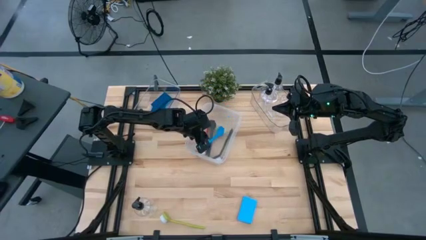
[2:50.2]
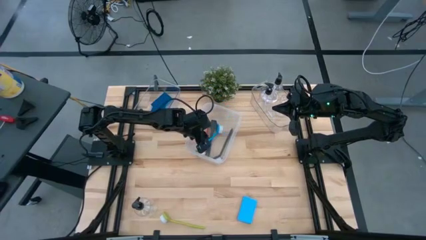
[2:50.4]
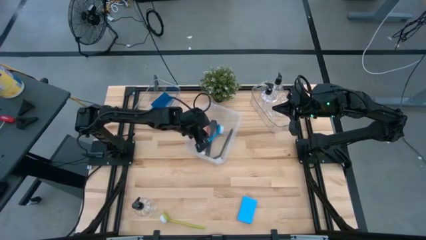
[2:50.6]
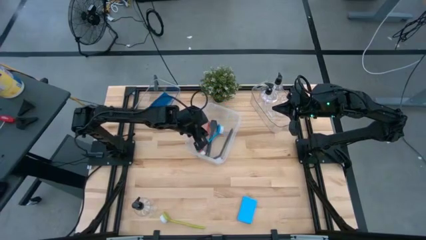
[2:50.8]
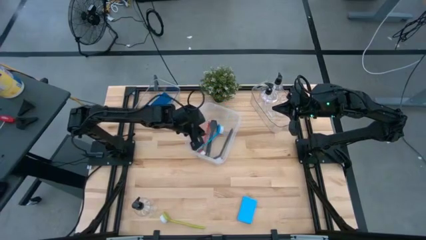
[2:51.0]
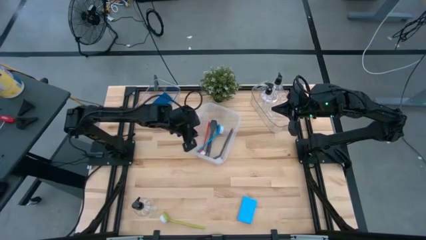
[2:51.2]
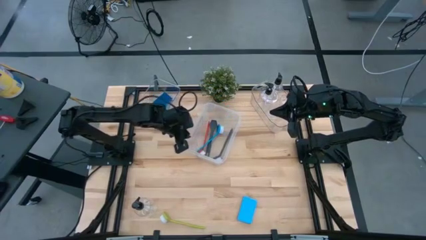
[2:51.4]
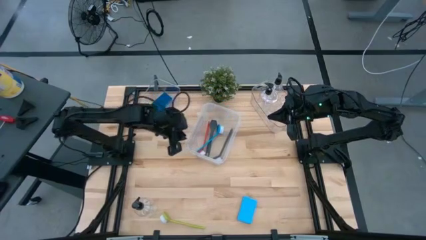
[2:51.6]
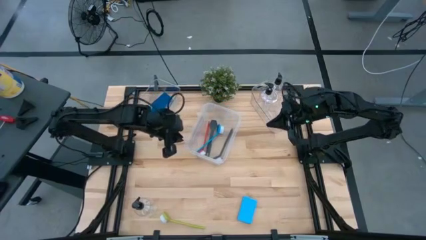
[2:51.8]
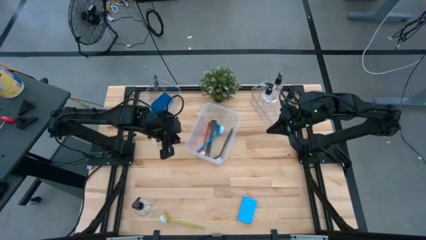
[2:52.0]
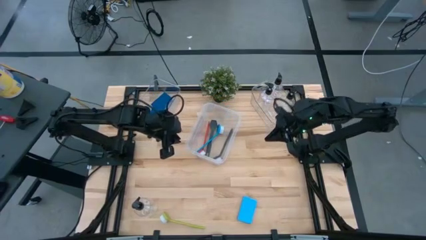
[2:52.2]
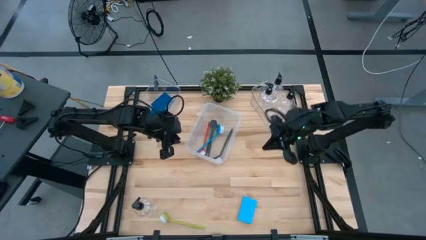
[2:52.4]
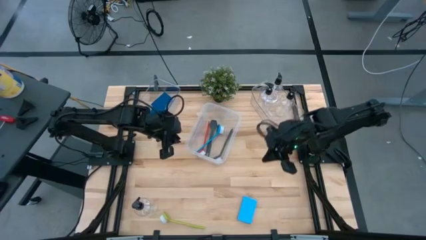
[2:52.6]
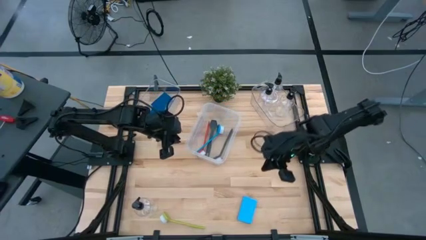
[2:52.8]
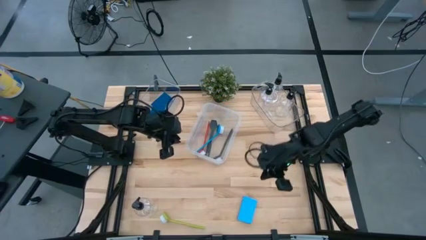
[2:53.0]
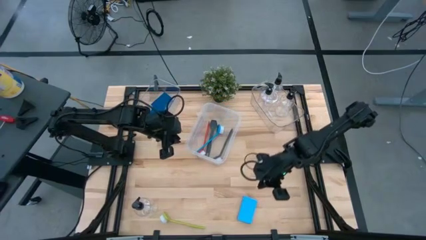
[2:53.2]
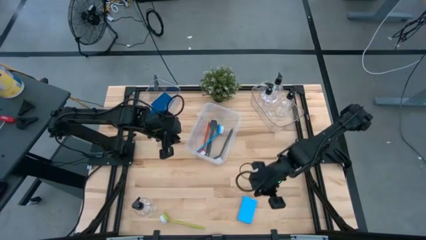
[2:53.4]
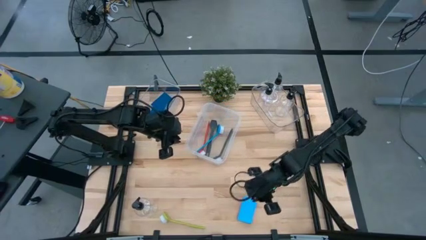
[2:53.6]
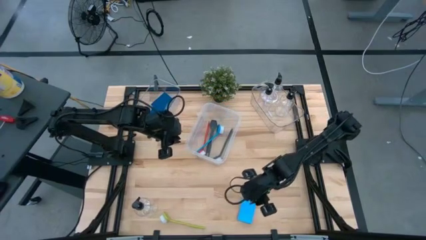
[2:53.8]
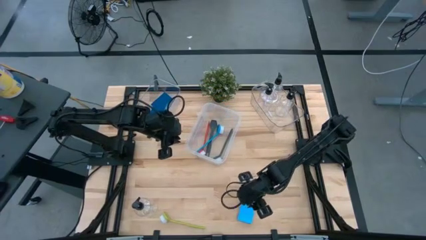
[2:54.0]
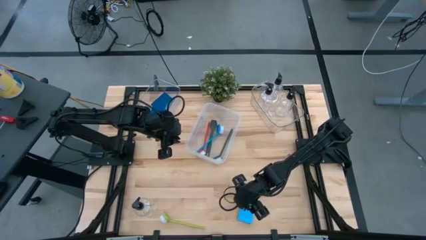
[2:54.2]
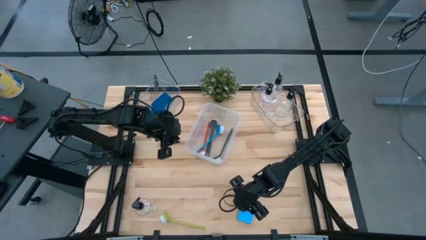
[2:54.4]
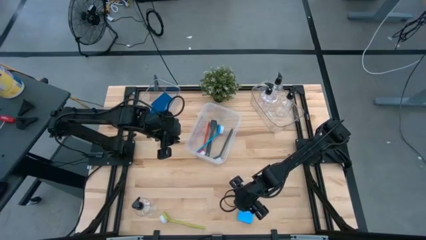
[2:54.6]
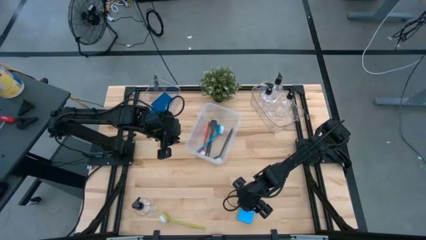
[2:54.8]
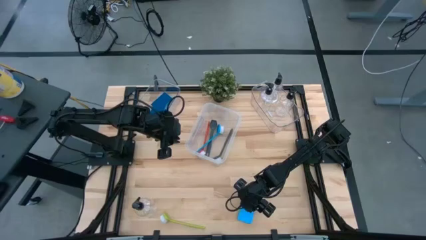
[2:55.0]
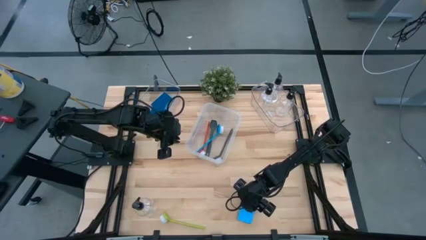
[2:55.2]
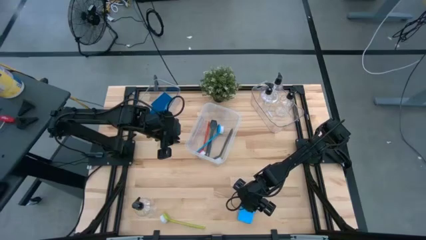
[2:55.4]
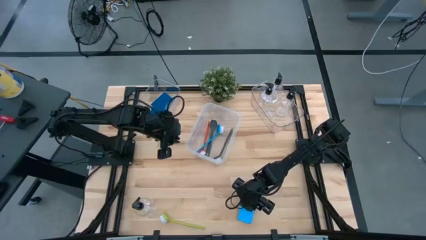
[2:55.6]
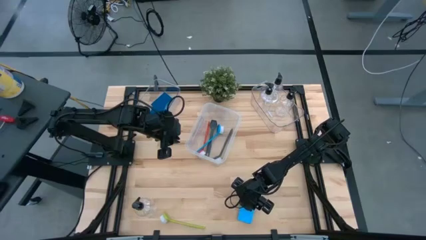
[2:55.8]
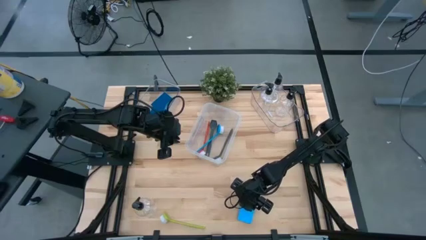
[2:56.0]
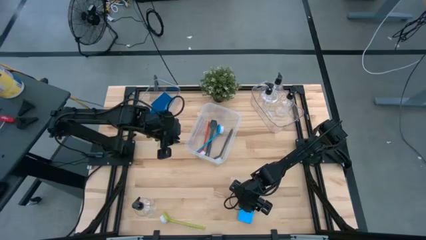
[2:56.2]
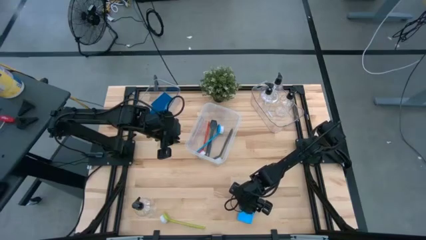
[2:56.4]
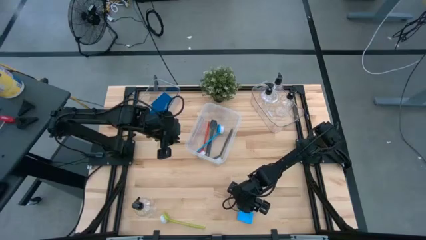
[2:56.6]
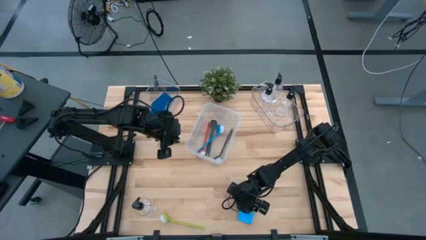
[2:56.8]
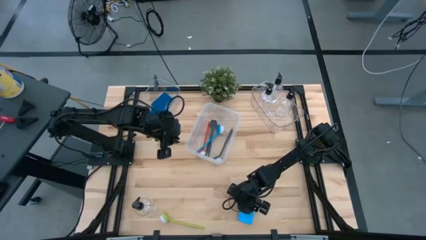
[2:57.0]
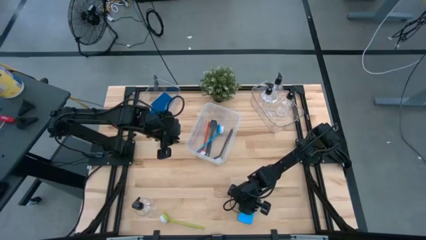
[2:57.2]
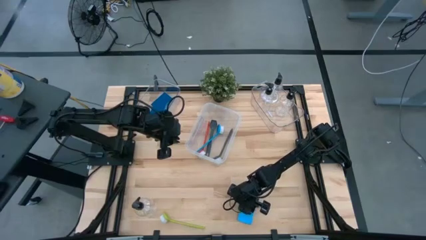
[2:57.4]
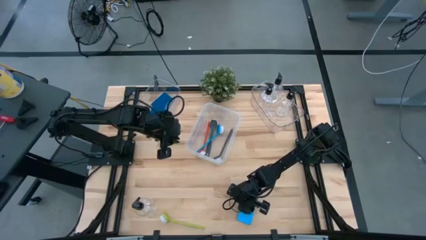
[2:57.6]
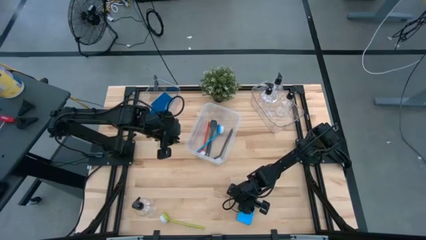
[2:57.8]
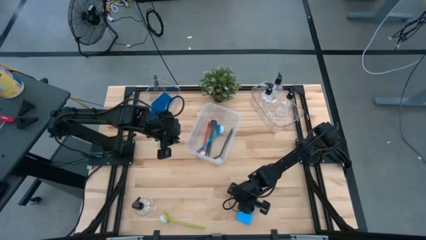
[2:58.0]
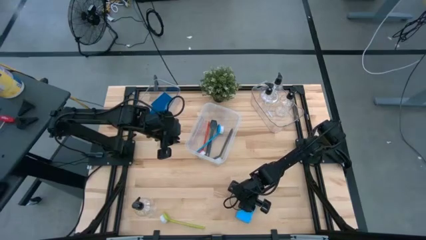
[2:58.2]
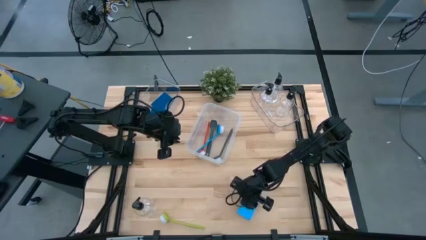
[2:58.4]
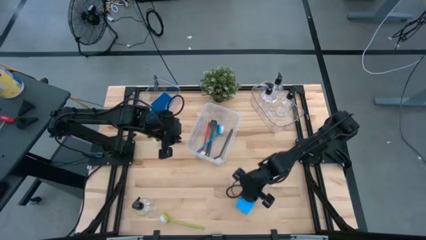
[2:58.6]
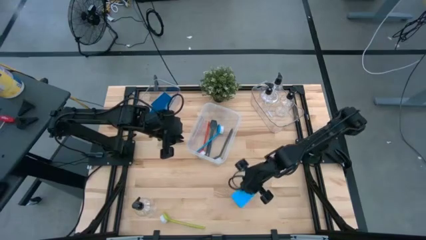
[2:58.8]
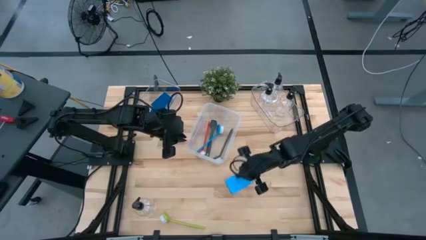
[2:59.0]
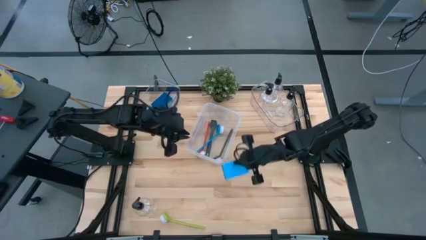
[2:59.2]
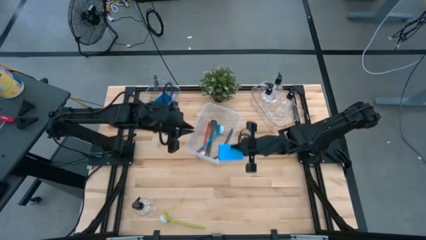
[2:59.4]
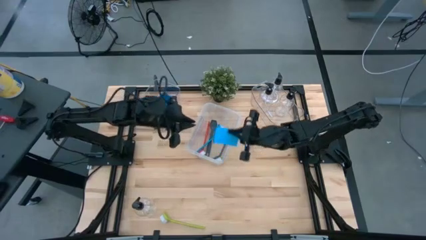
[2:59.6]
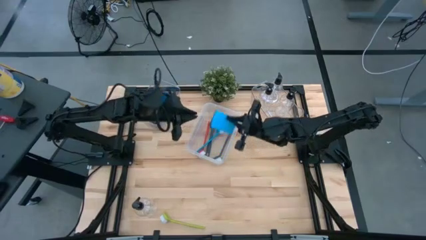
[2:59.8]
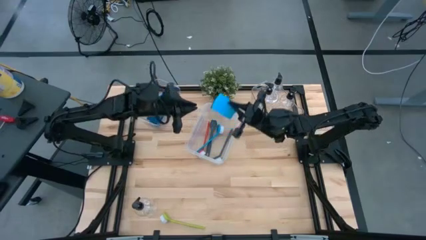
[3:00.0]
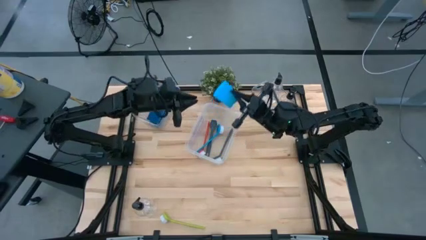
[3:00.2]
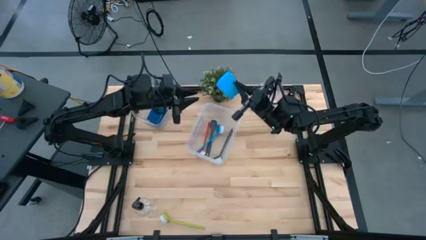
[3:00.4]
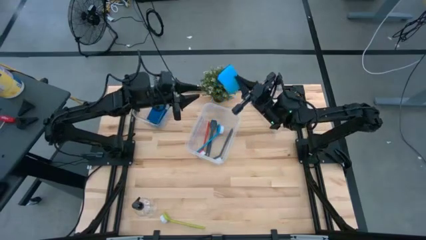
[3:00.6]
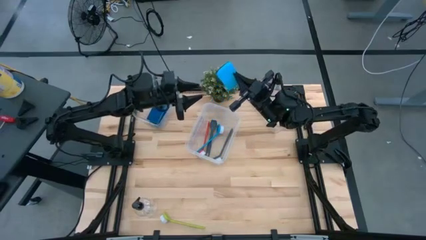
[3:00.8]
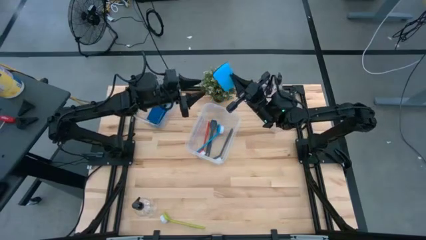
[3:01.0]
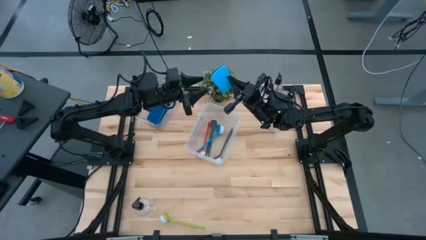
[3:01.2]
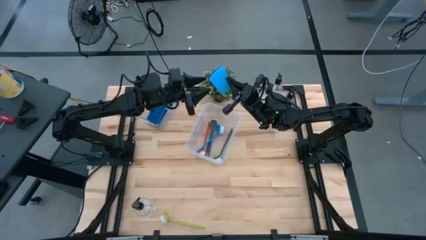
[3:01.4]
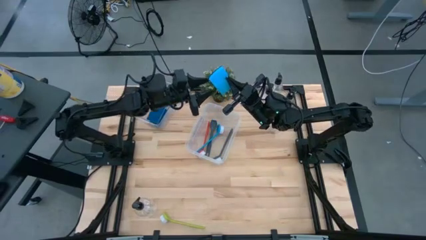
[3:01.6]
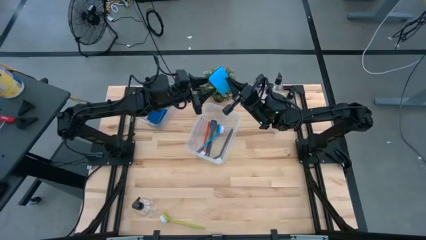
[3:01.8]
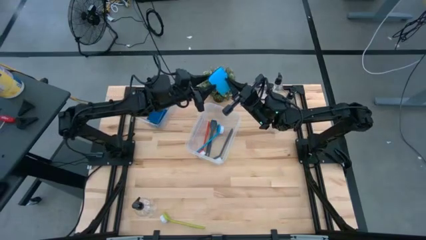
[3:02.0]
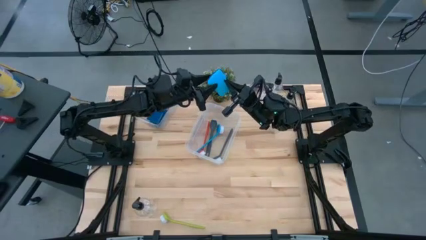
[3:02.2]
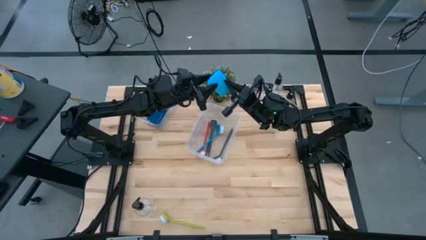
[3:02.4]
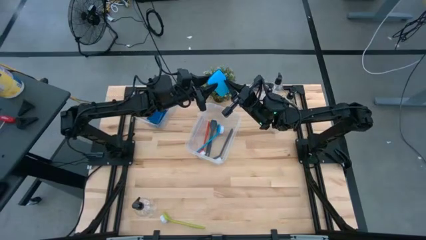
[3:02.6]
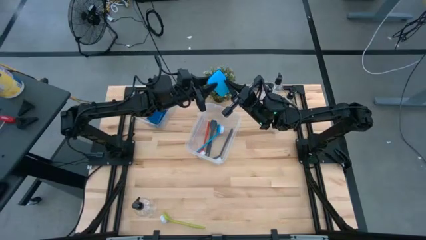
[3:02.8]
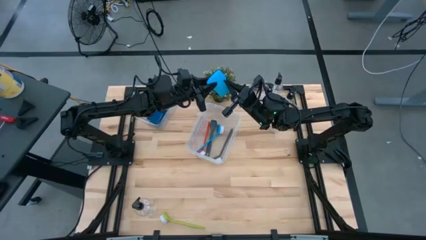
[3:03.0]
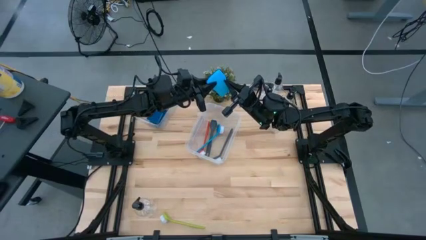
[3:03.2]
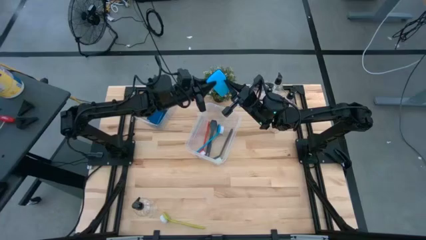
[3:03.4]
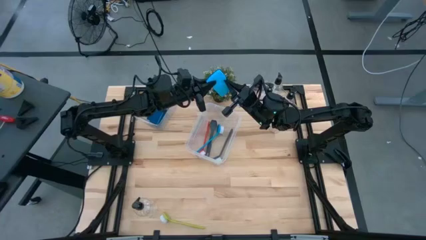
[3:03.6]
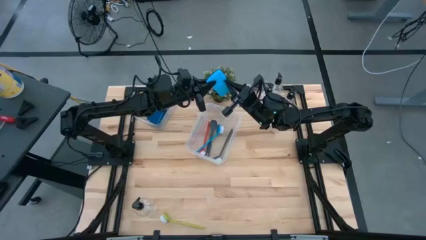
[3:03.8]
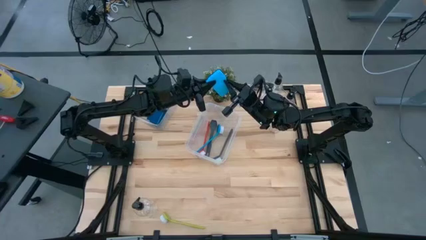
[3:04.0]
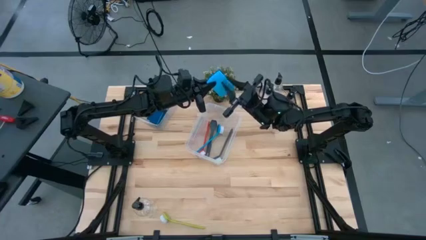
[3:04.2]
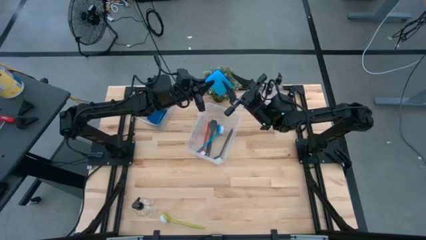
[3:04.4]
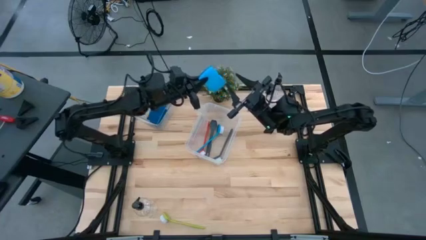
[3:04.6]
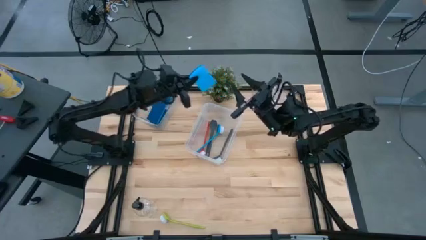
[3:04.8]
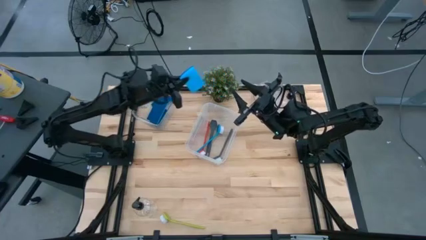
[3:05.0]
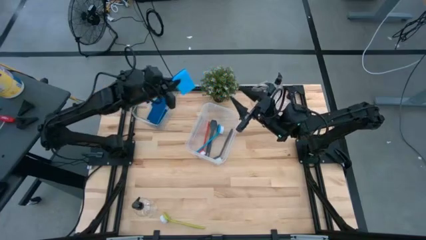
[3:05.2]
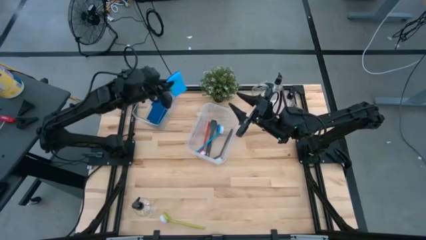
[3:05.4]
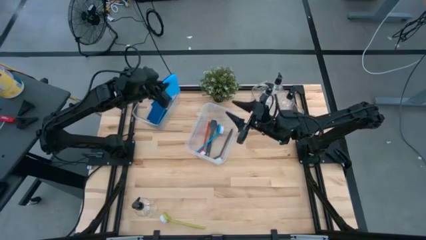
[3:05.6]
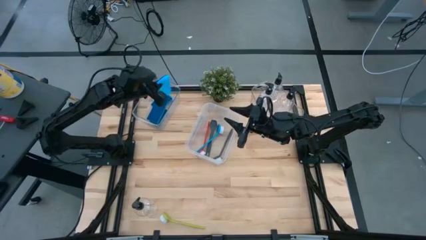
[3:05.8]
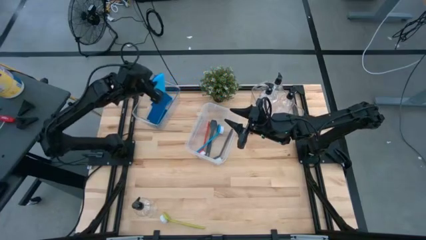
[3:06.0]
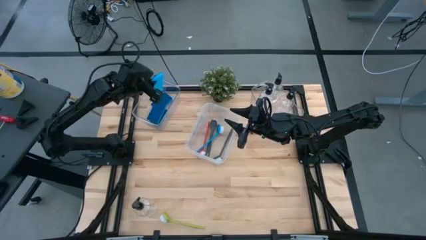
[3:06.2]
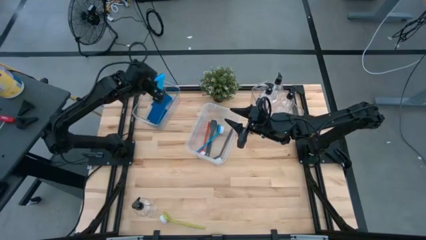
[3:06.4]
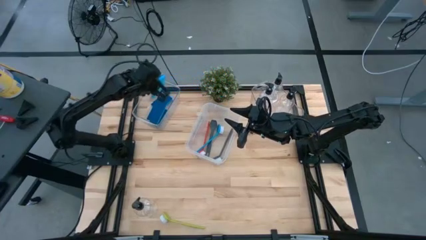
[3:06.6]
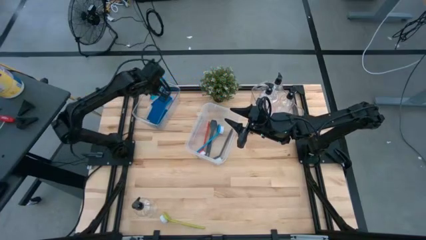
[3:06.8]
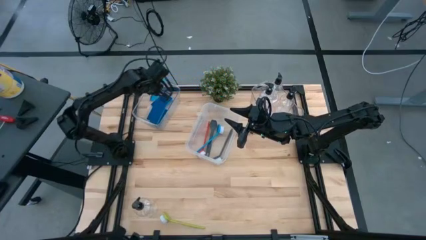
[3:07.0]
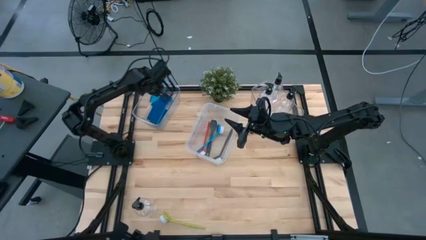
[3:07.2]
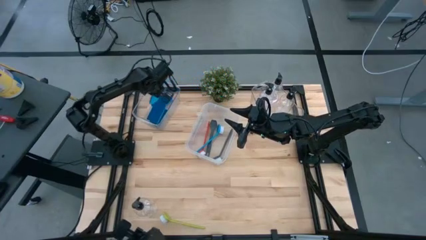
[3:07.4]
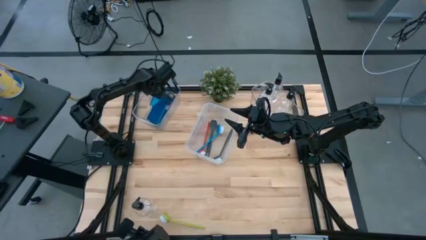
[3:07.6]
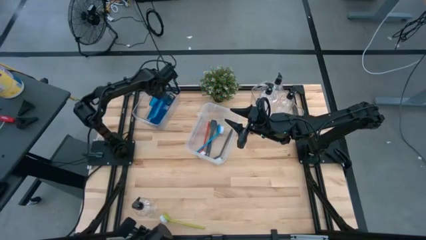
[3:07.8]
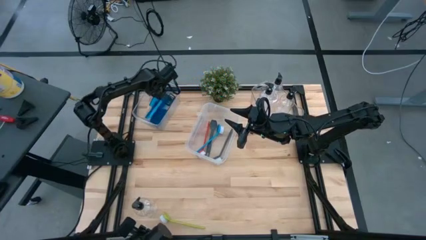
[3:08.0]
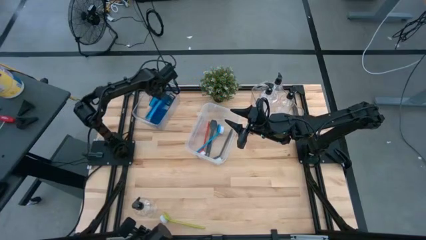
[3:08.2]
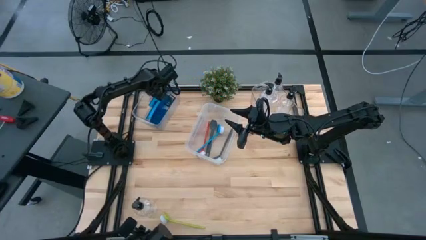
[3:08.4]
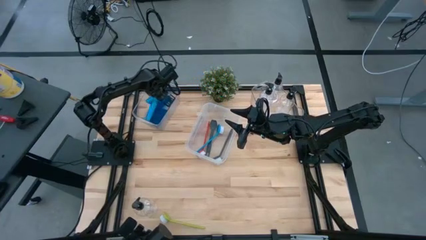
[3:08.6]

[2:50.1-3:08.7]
Task: Pick & Place Kitchen Sink Supplies
Put the blue sponge in the left transparent bin
